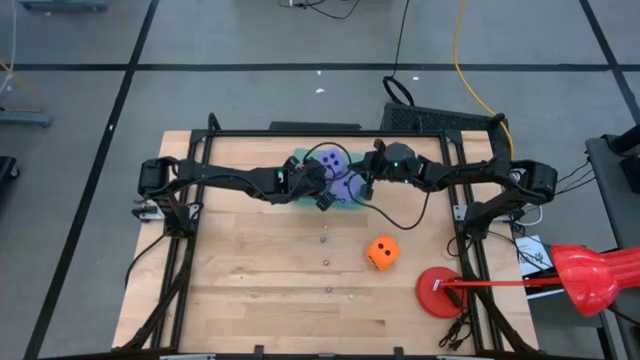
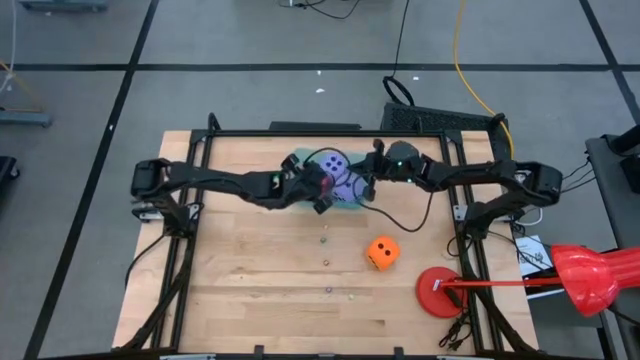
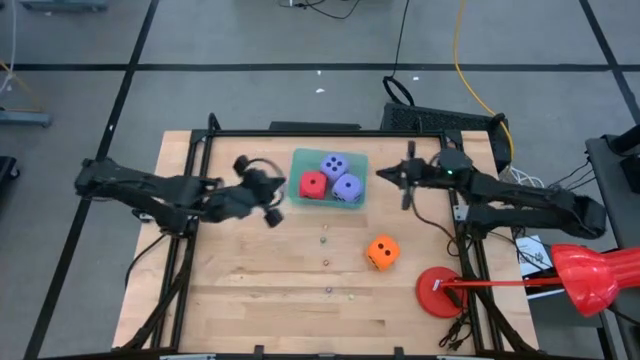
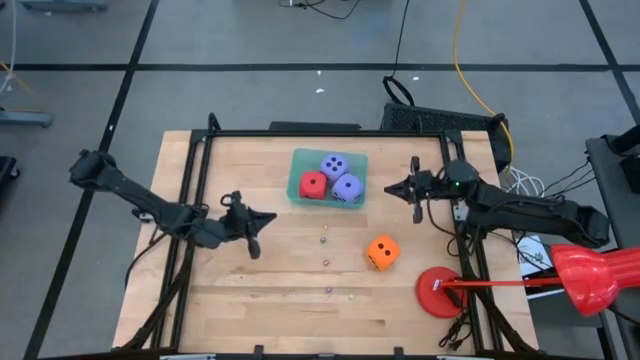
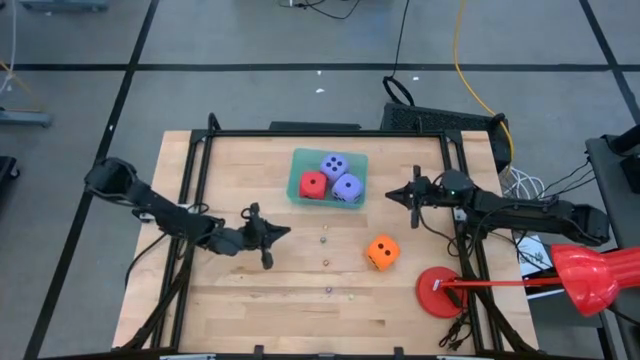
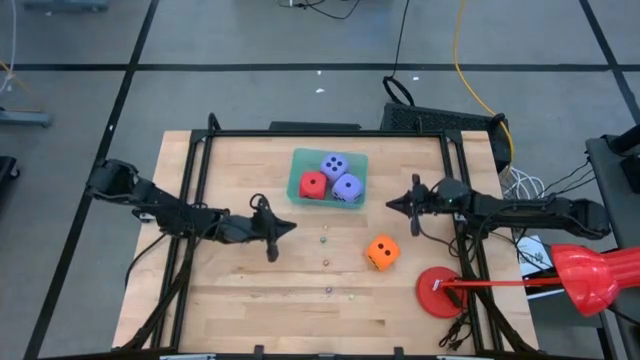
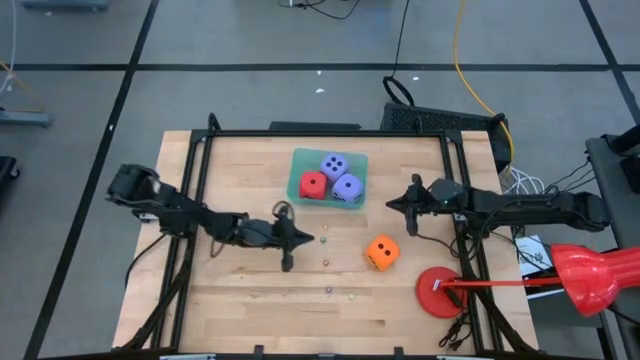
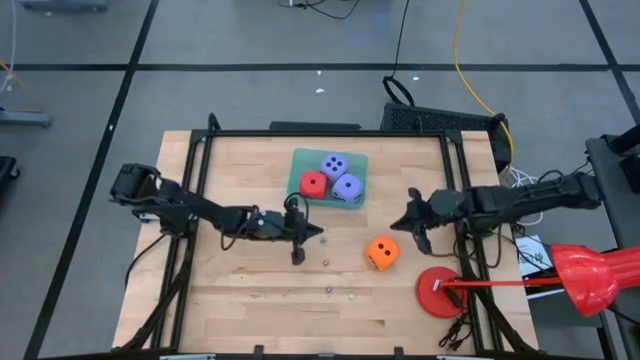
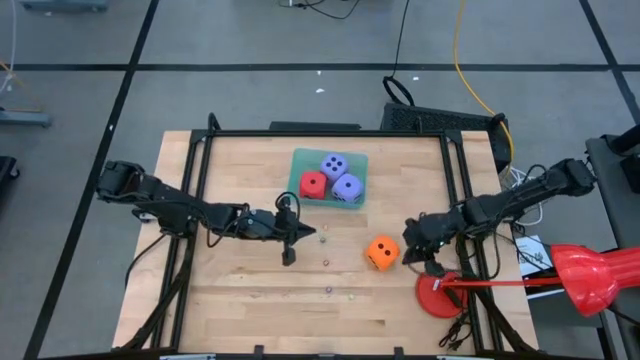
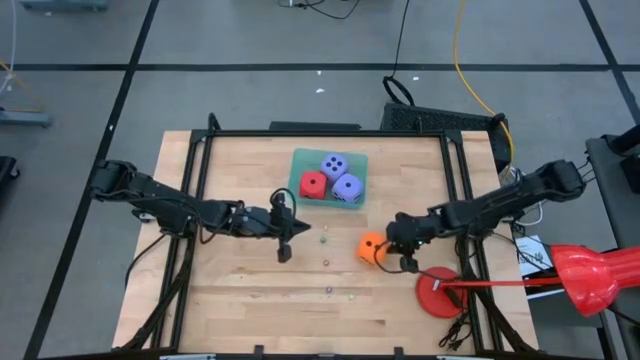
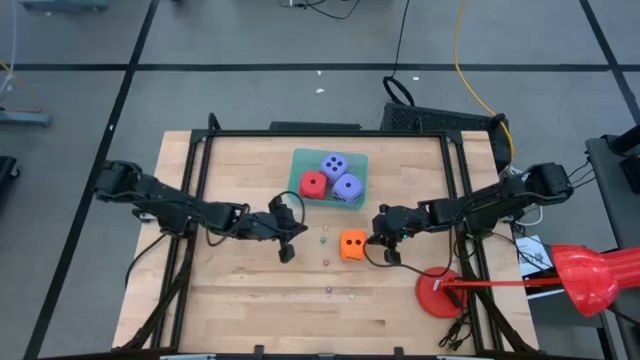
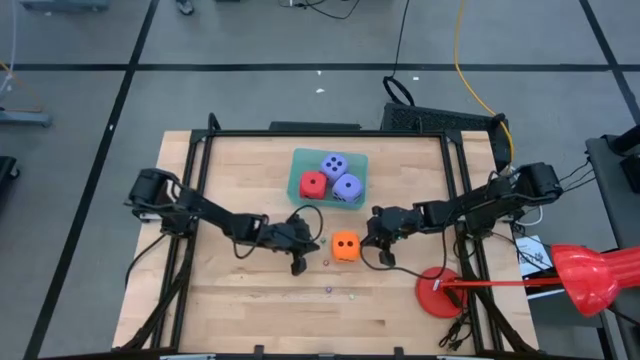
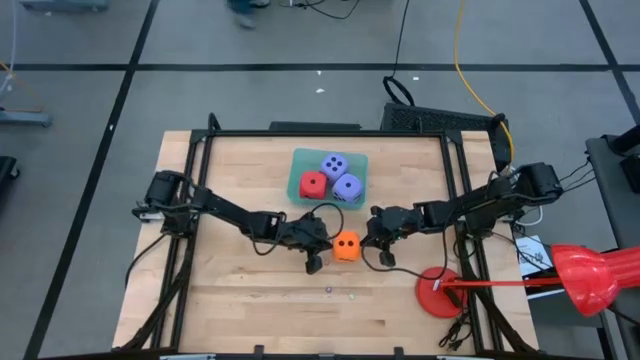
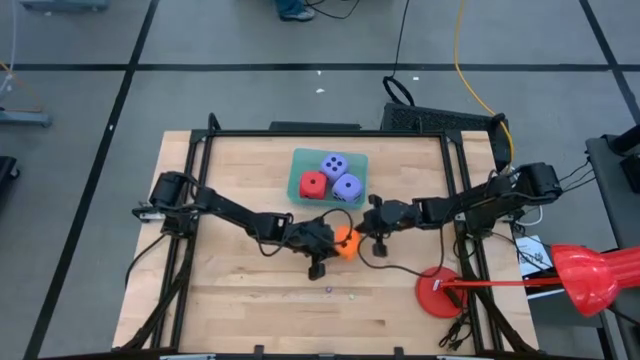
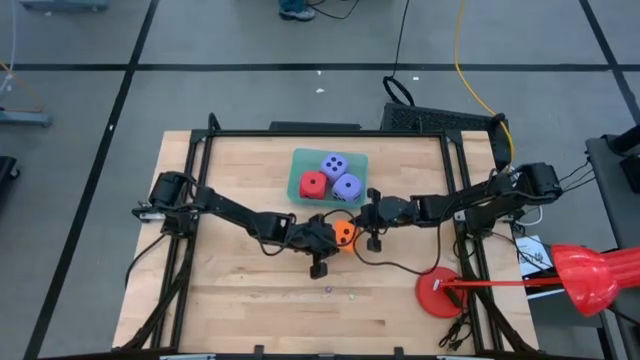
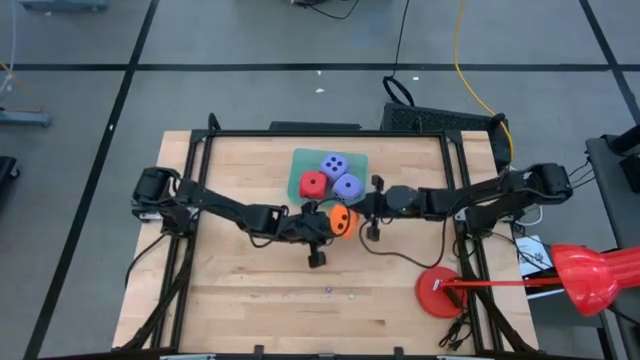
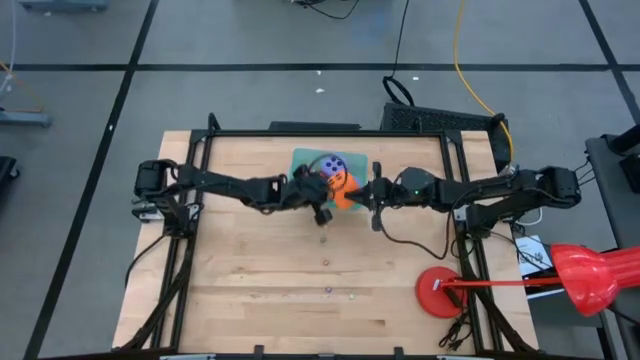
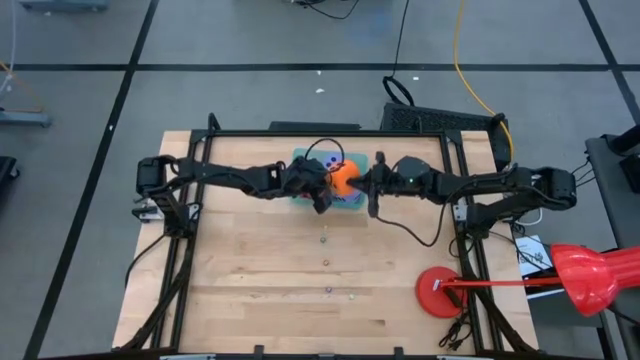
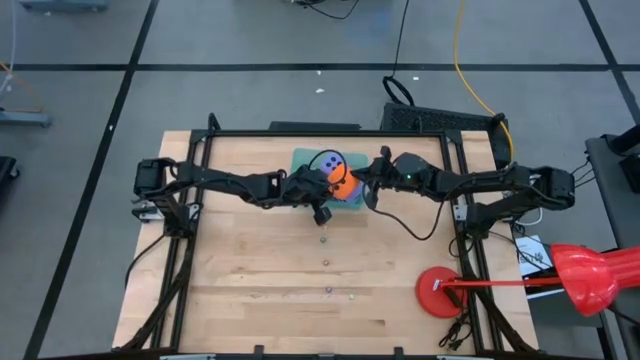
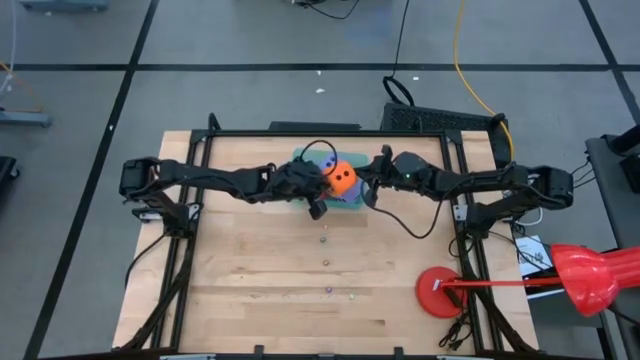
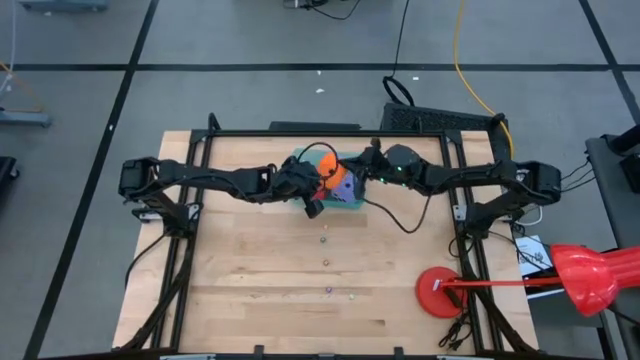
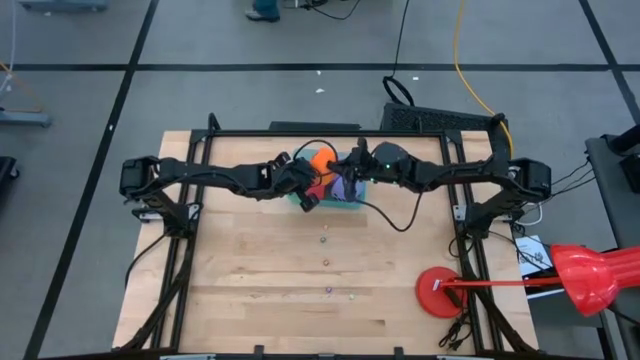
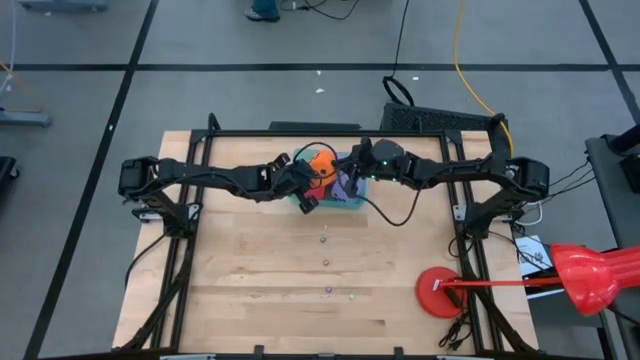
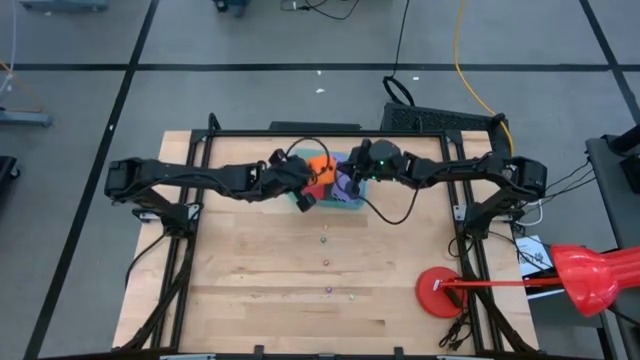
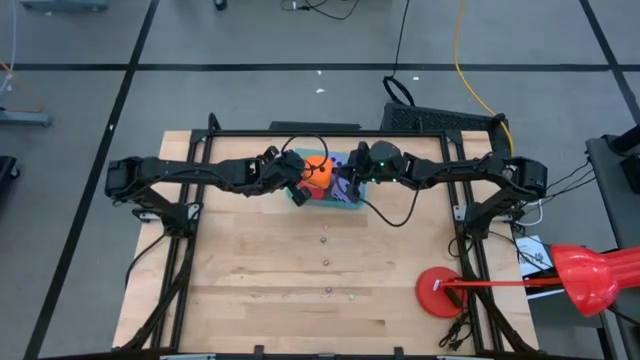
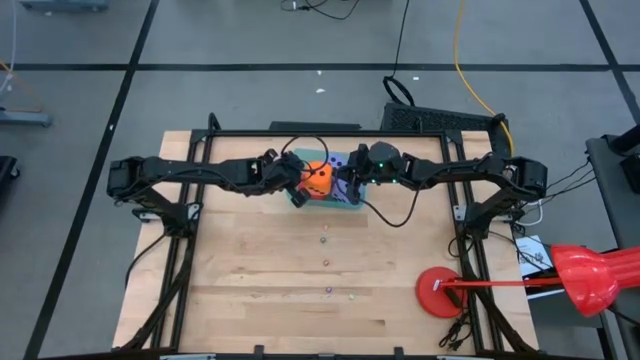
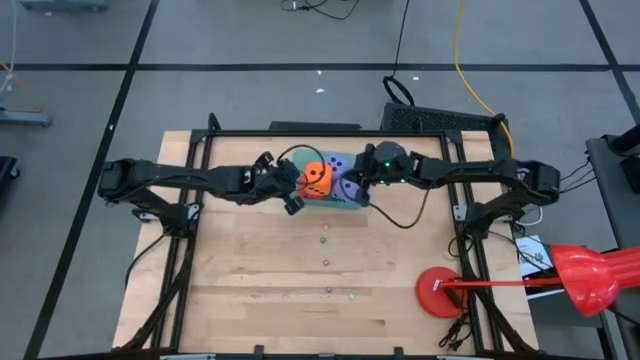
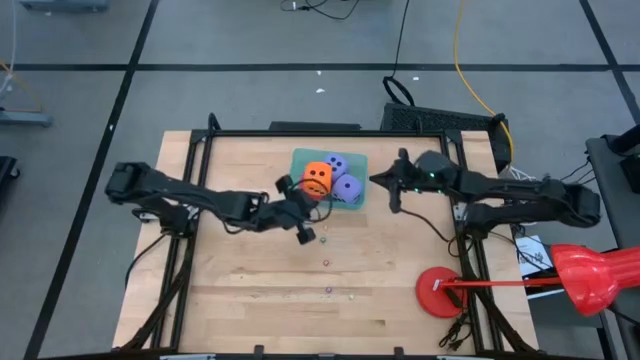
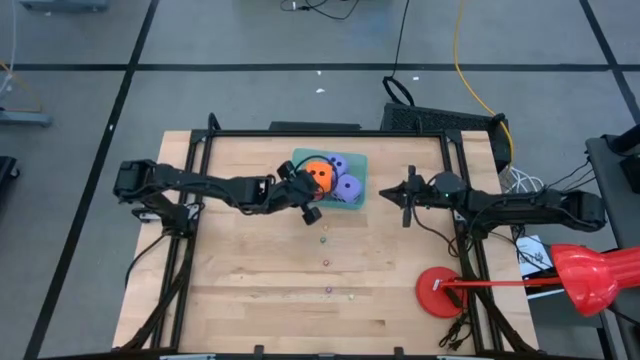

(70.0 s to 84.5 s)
Task: Pick & Place Dice
Put the large orange dice into the blue bin

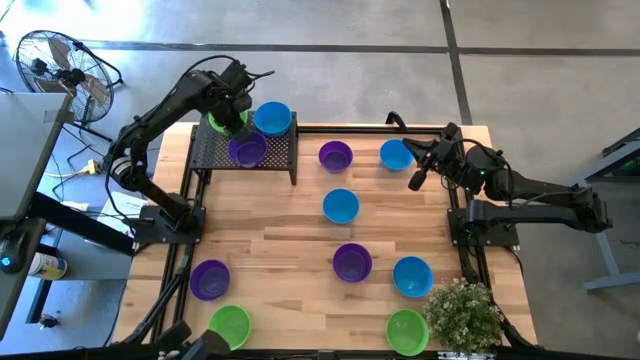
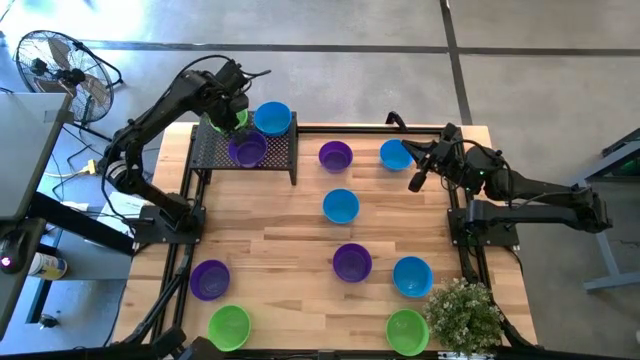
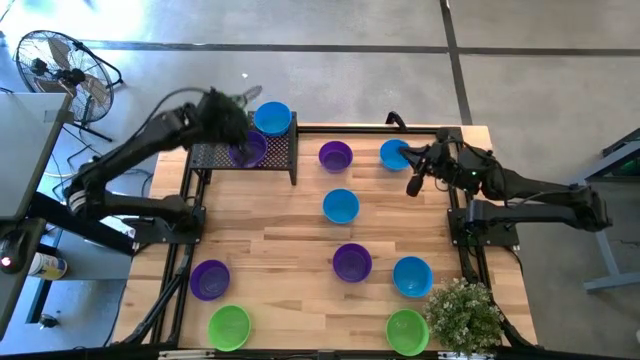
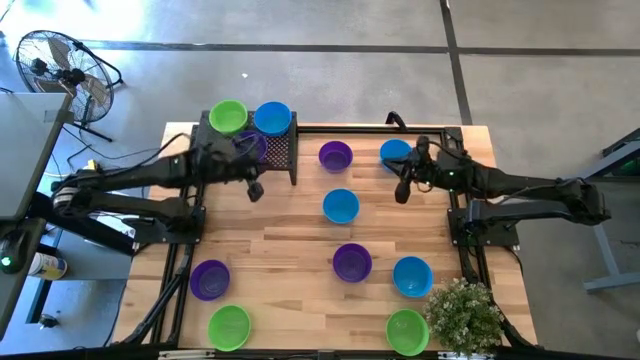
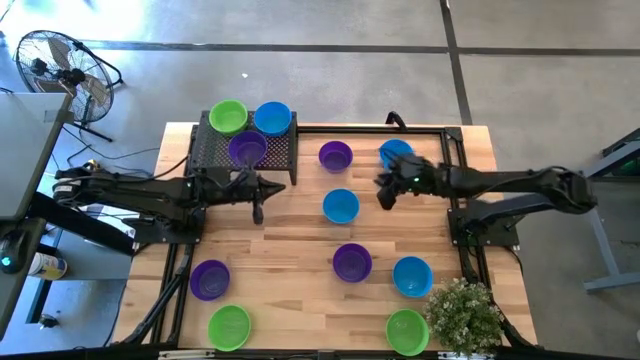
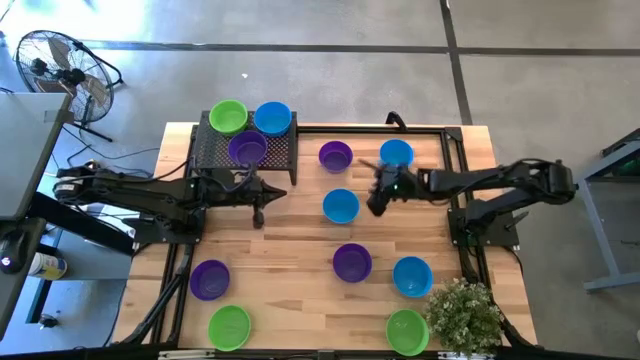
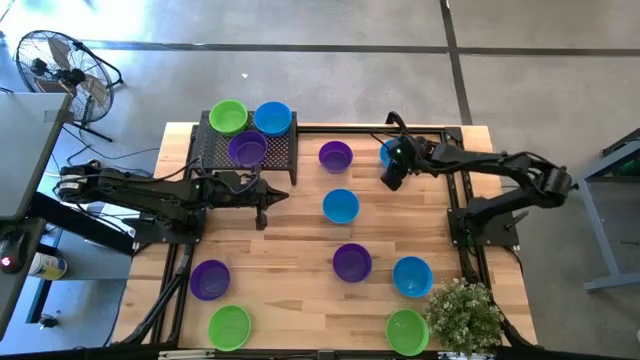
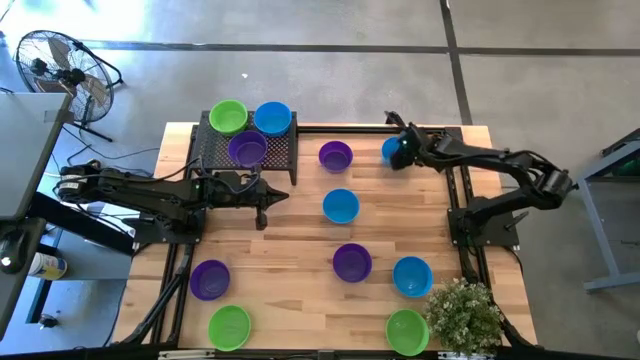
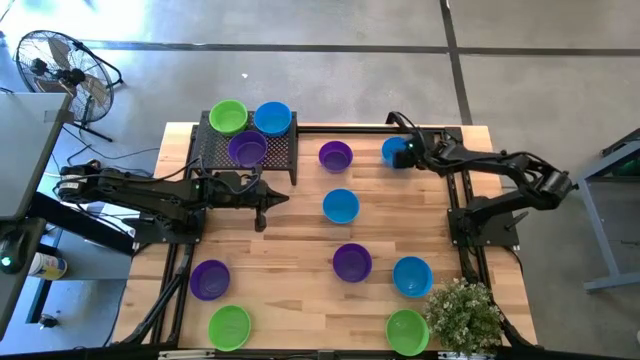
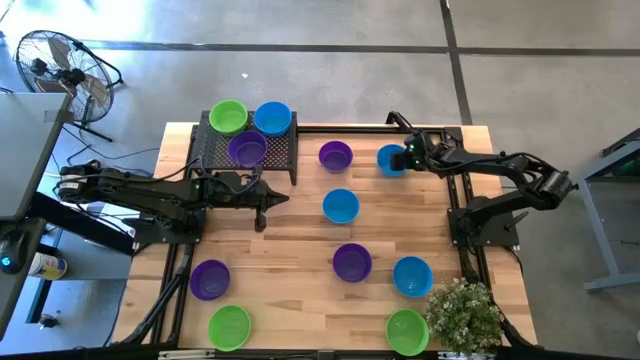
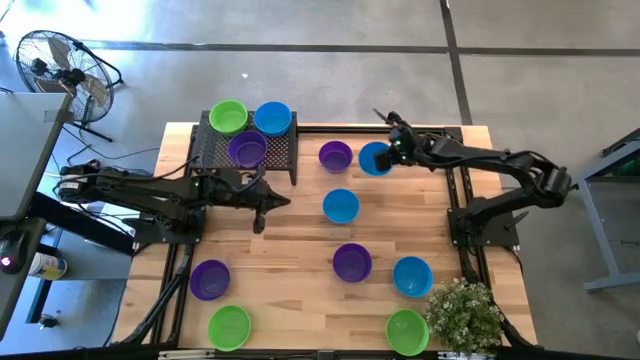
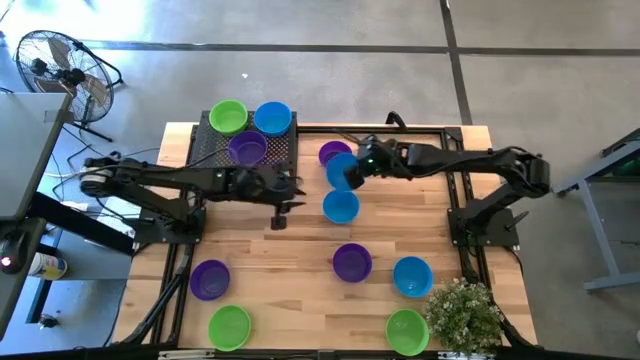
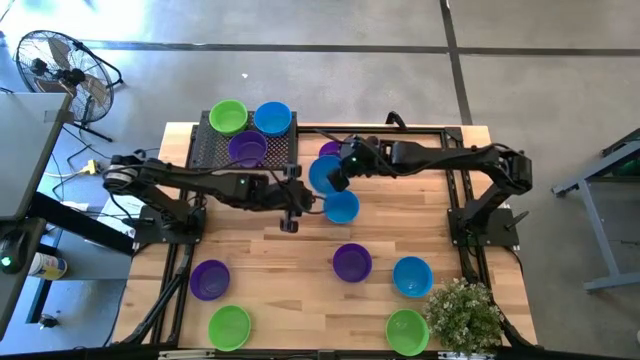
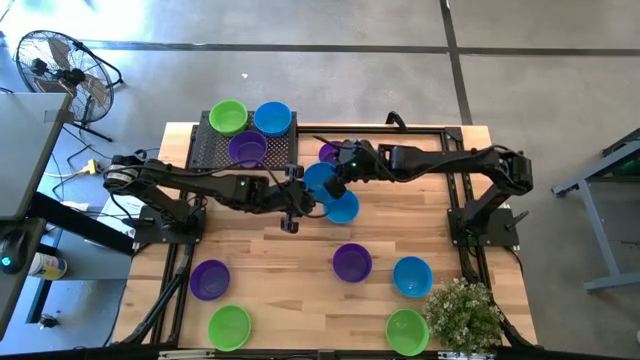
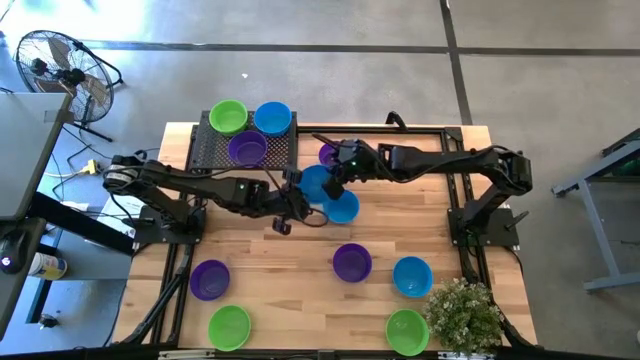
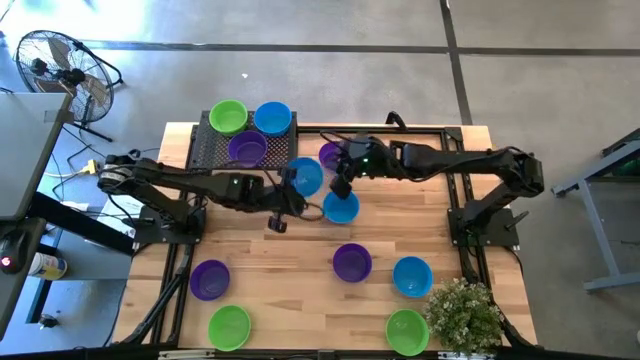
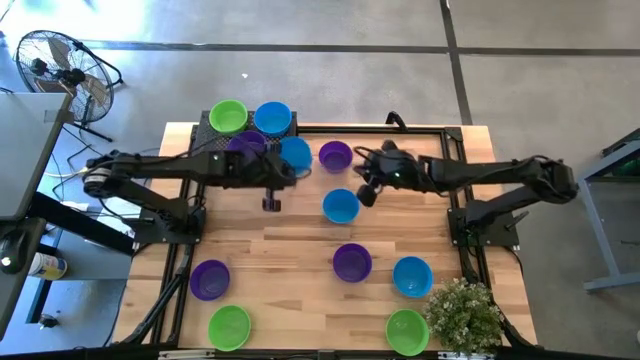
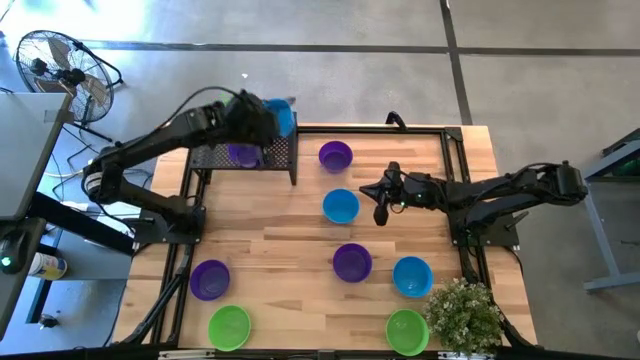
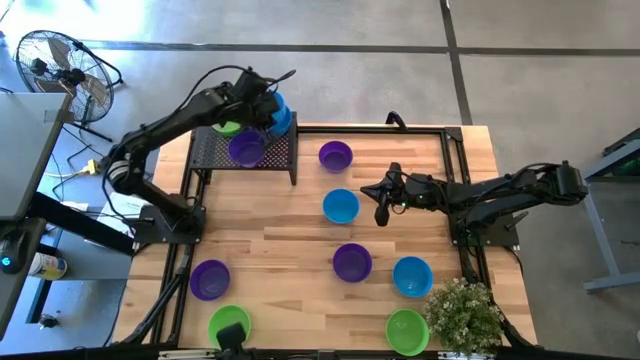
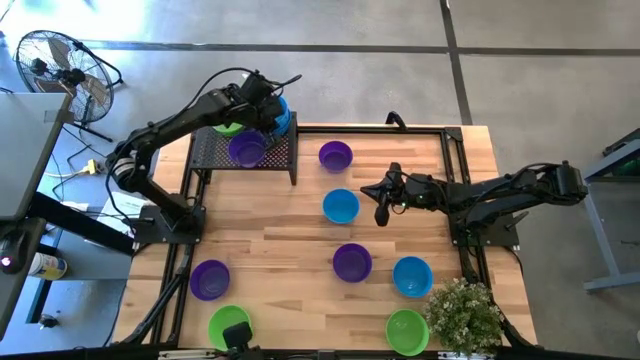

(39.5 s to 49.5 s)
Task: Pick & Place Mini bowls
Stack the blue bowl on top of the blue bowl on the shelf
